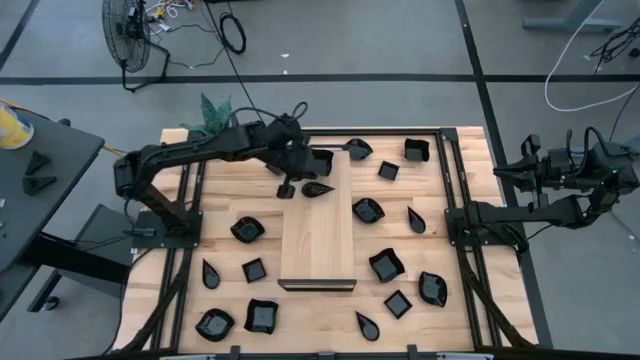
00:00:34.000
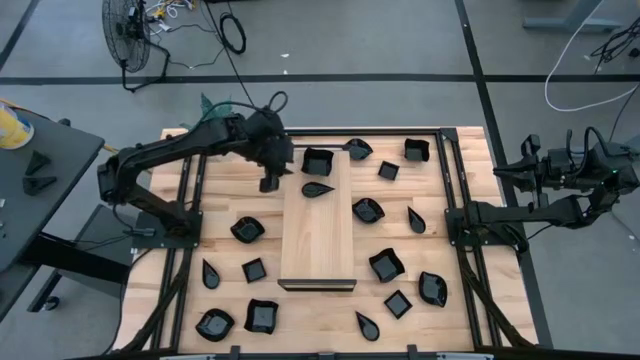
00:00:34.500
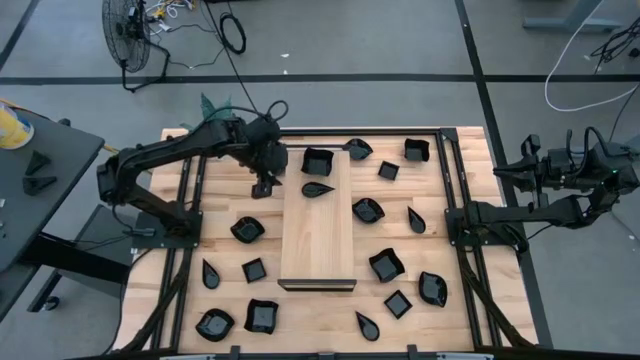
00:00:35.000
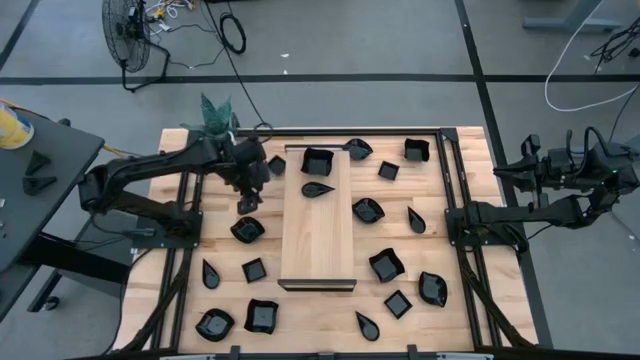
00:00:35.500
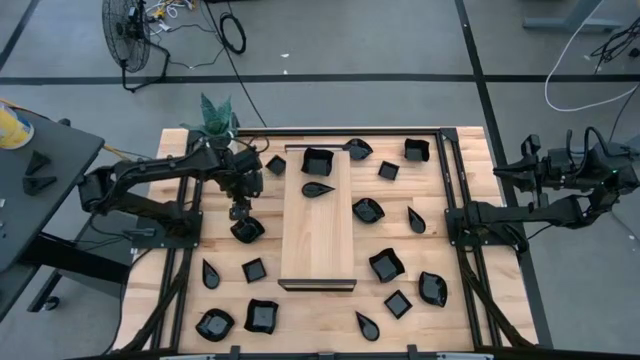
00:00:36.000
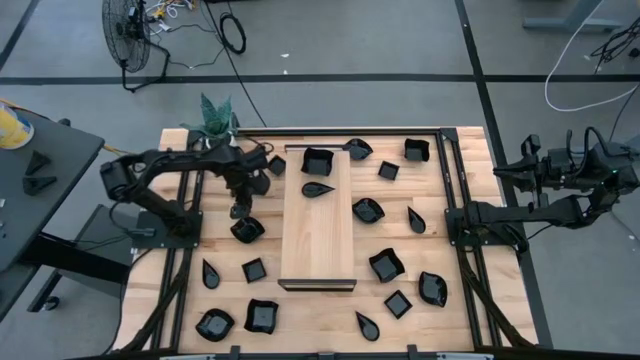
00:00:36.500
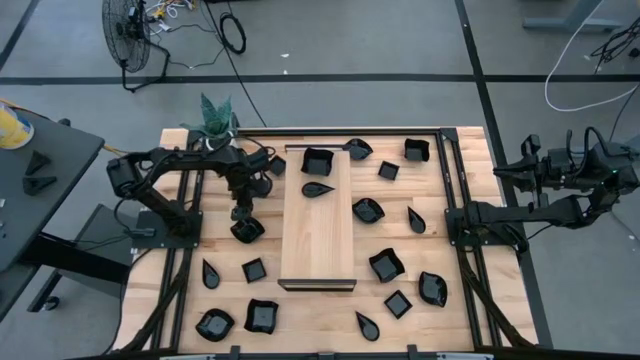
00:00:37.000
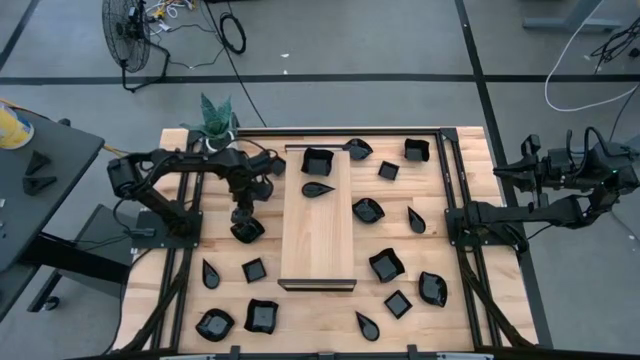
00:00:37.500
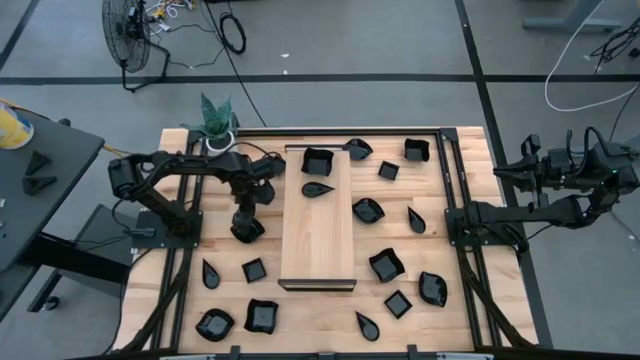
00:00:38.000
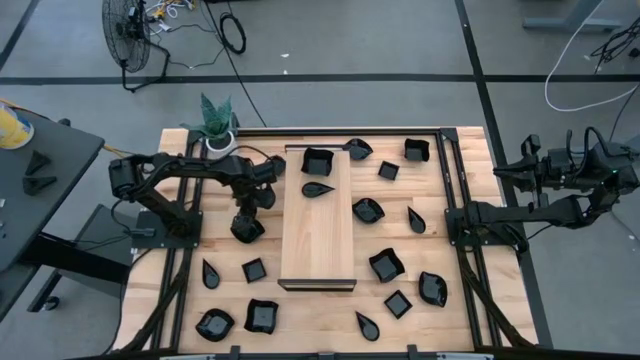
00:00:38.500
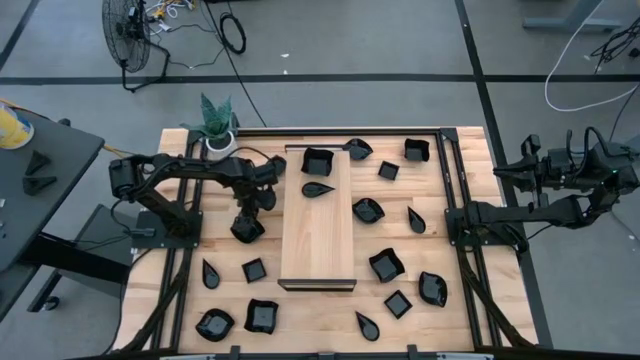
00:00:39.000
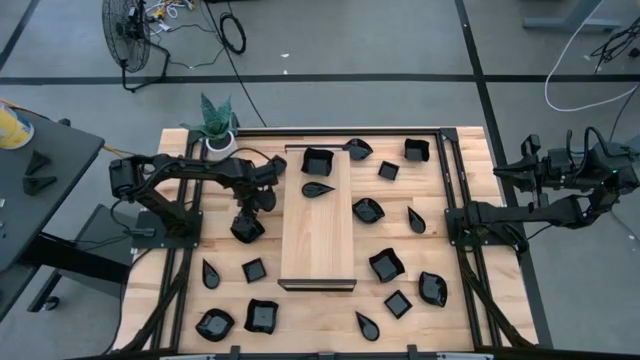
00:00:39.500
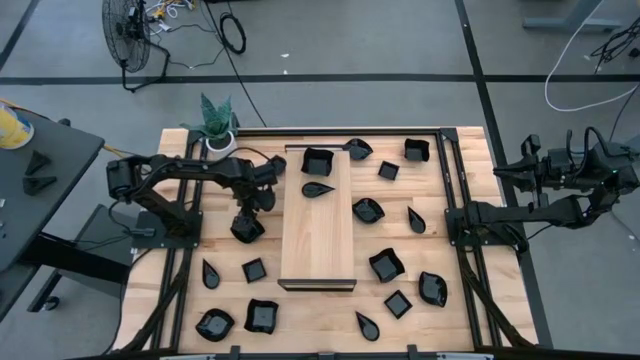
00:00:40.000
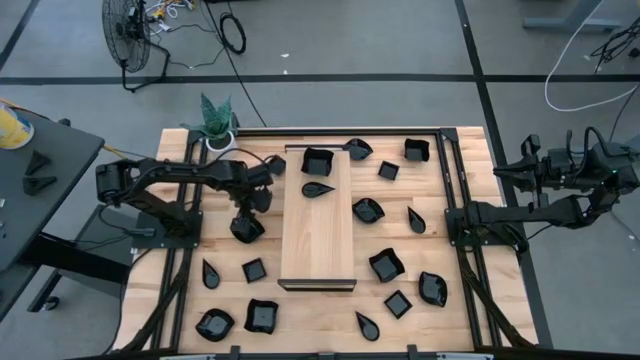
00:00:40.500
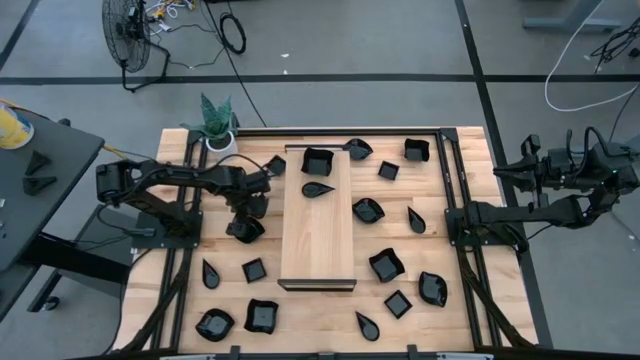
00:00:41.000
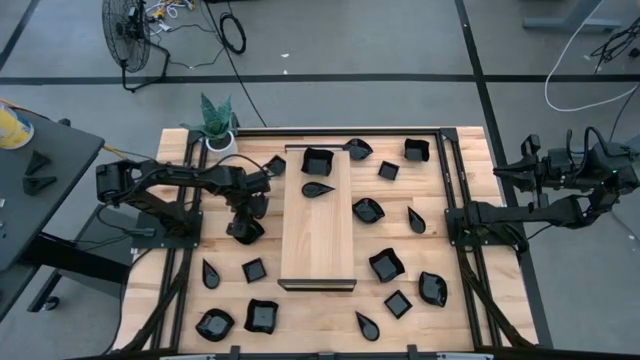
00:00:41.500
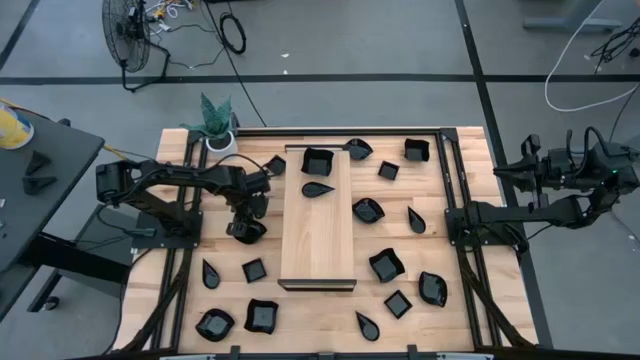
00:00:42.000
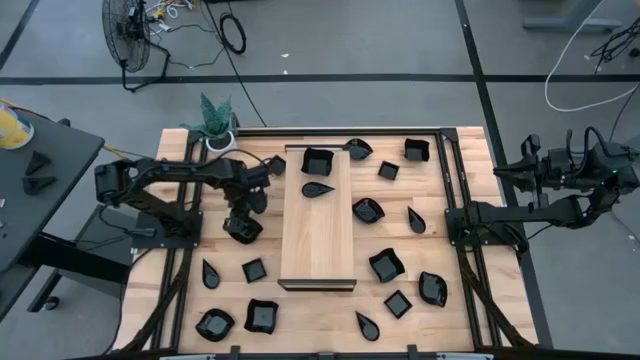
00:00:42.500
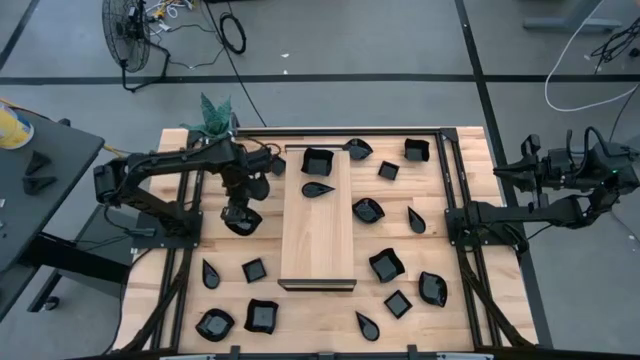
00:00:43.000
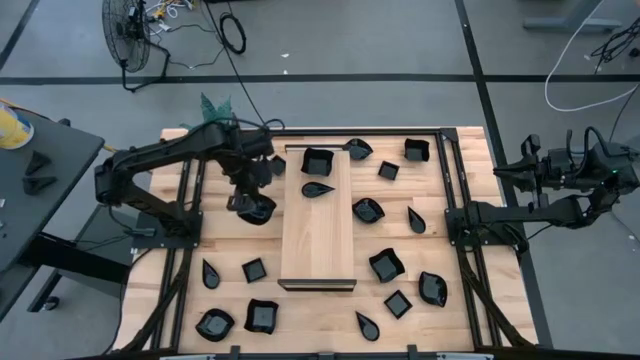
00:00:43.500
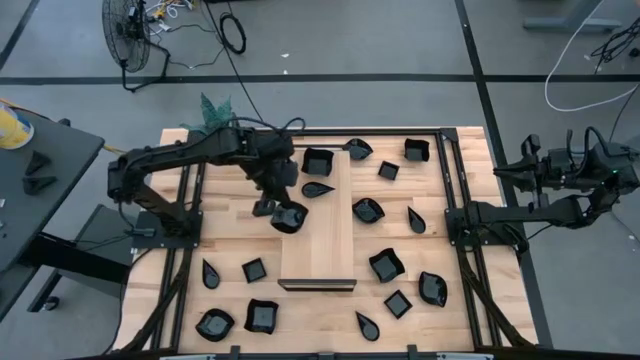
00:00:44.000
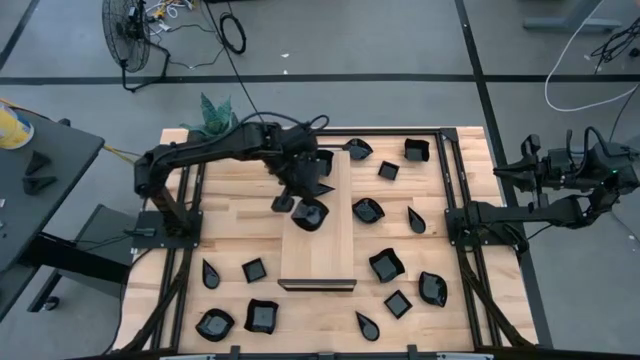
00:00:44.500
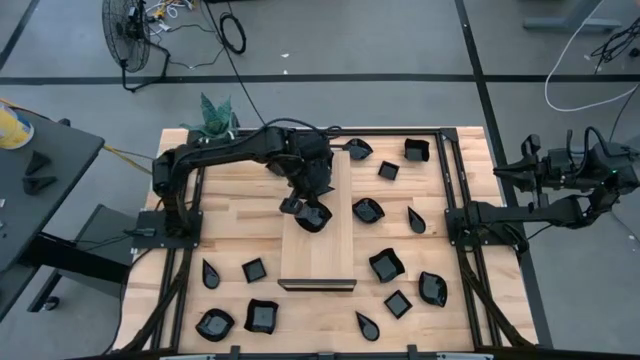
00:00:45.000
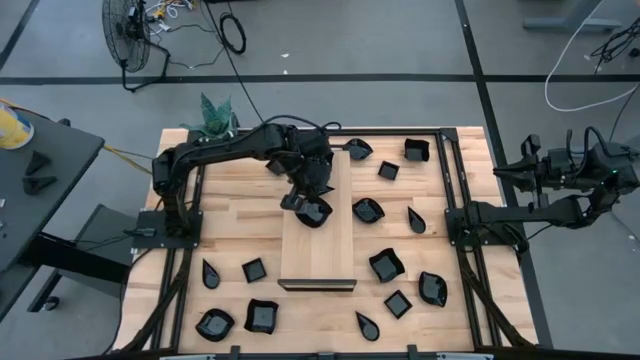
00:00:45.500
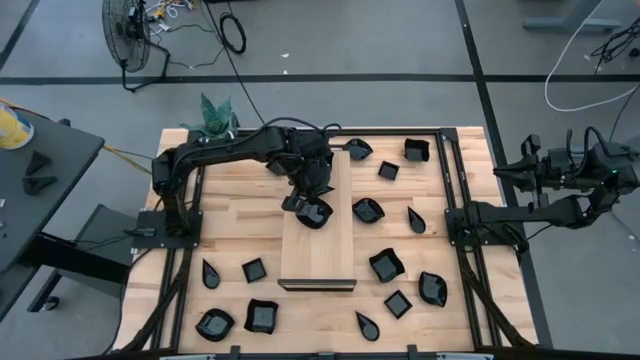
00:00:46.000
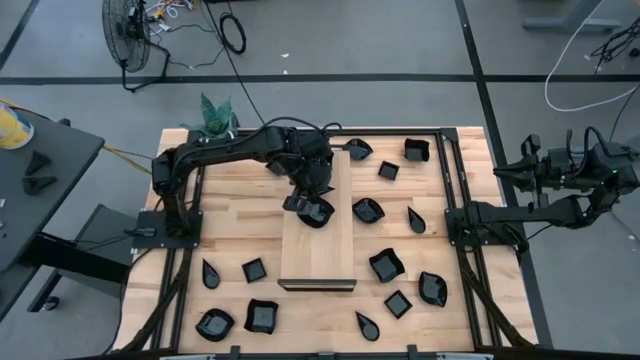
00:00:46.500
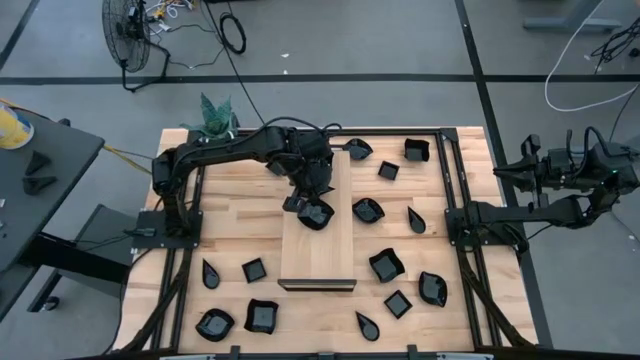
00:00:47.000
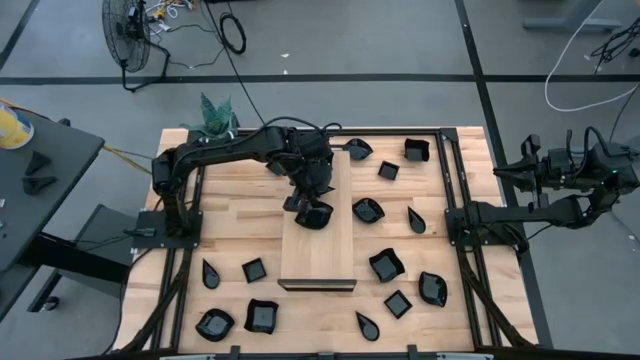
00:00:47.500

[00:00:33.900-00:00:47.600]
Task: Pick & Place Mini shaped plates
Put the leaf shaped plate on the shelf

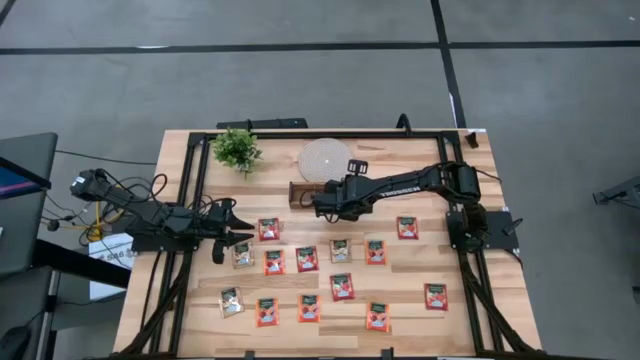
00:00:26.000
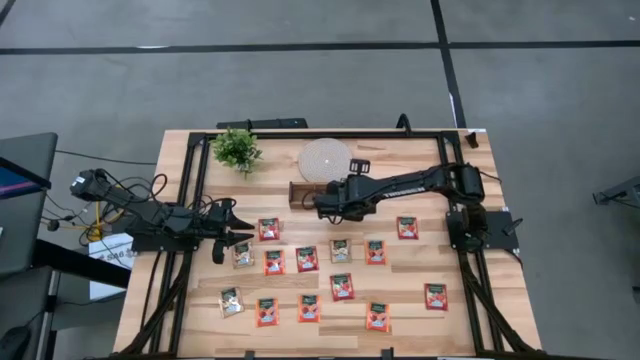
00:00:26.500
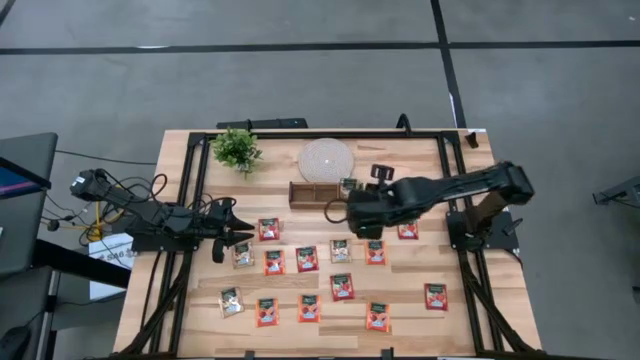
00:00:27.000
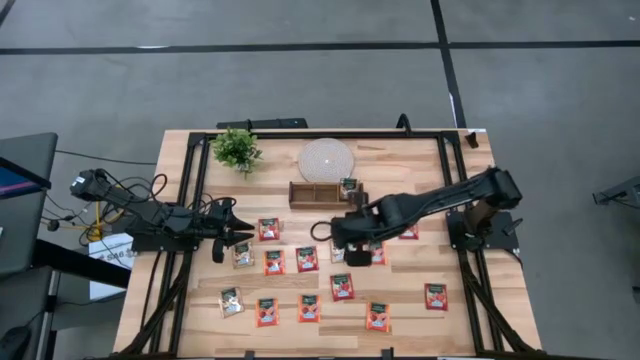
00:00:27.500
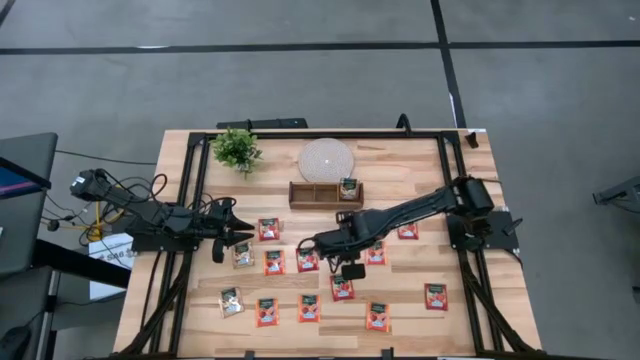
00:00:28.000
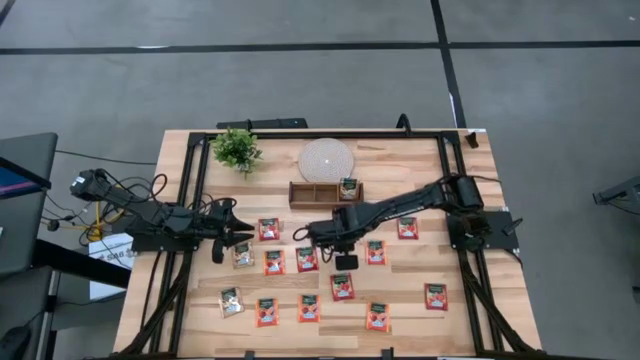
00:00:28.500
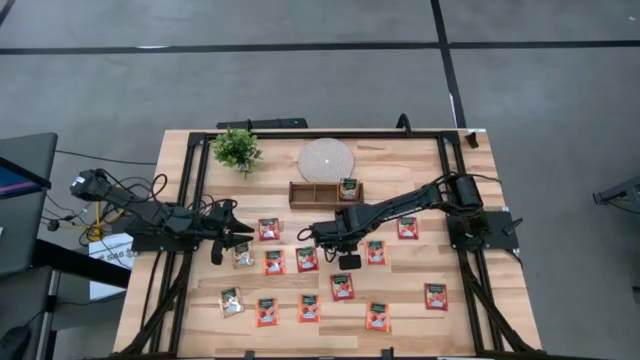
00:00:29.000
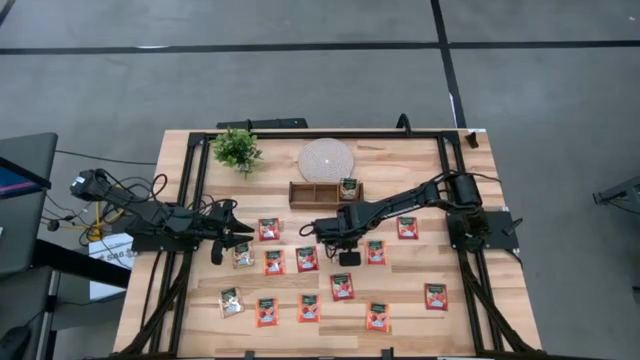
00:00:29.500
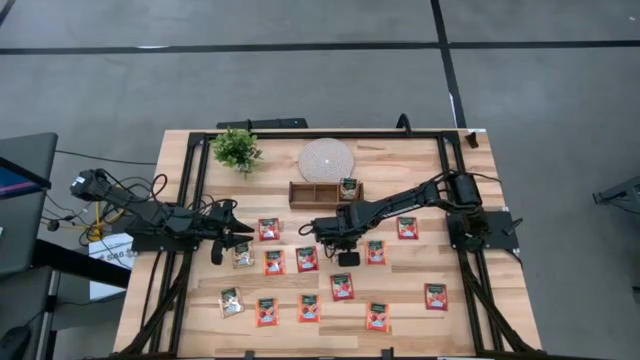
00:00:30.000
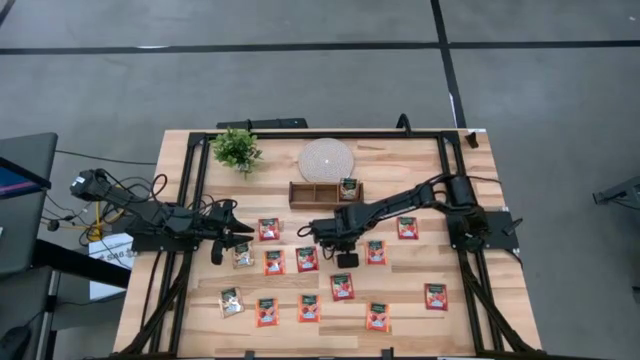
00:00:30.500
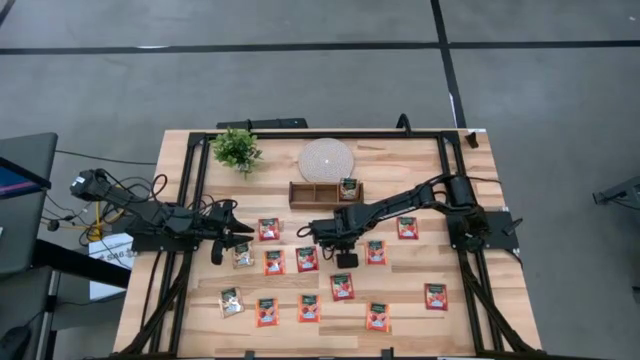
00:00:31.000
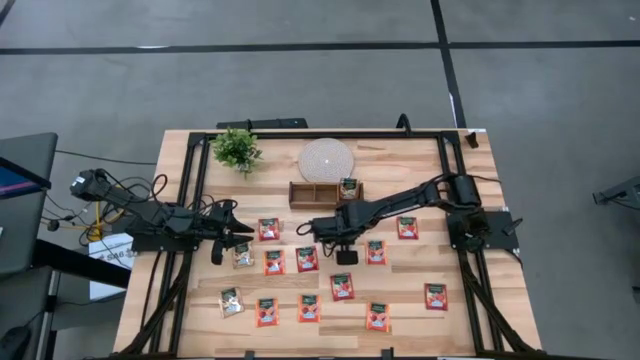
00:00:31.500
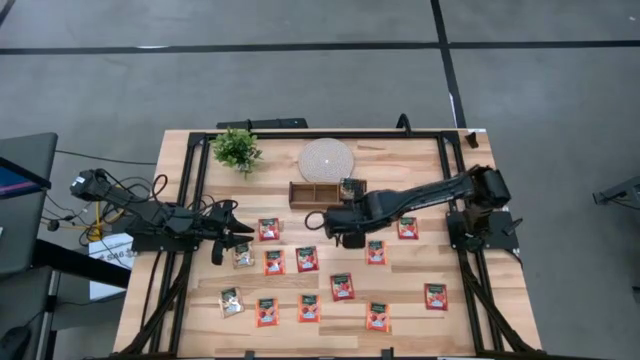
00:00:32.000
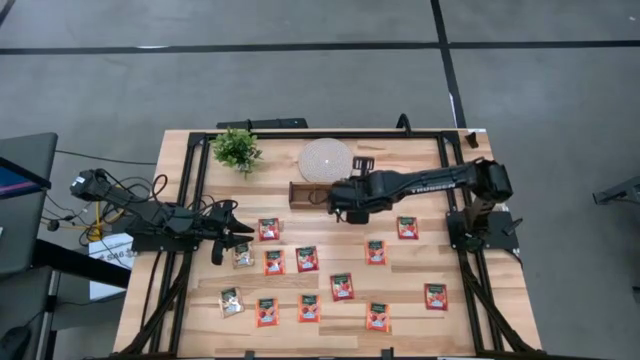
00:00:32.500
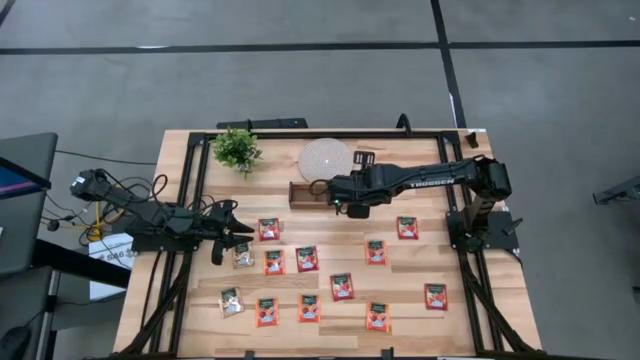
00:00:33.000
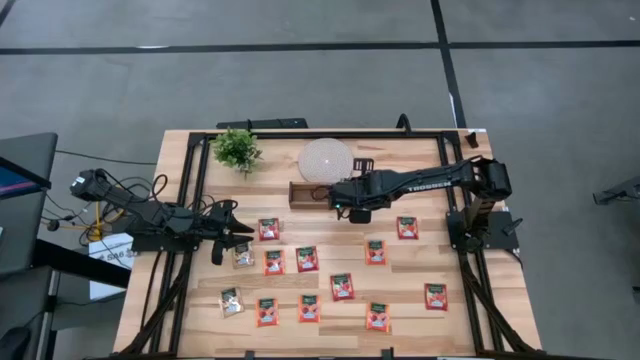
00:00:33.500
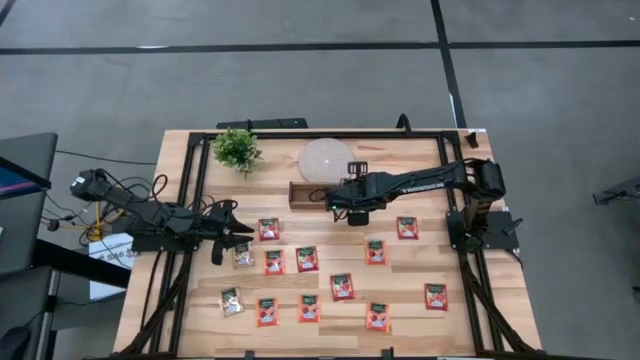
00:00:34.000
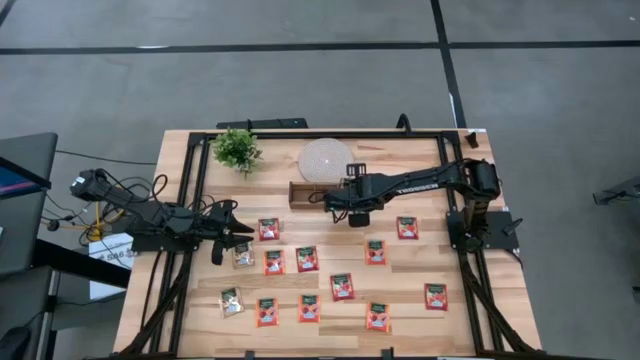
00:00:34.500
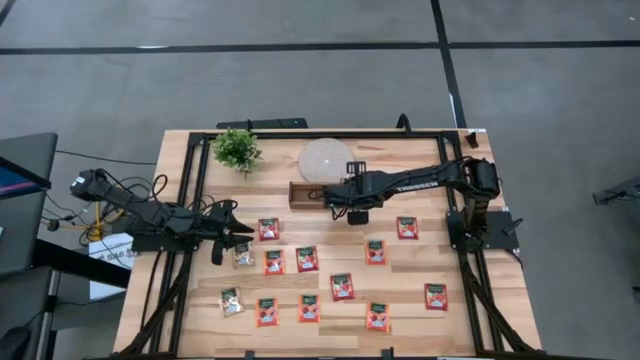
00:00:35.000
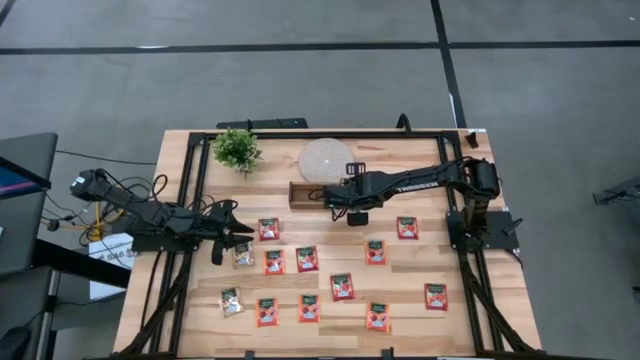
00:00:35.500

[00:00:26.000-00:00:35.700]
Task: Pick & Place Tea
Put the brown tea bag into the right section of the wooden organizer
